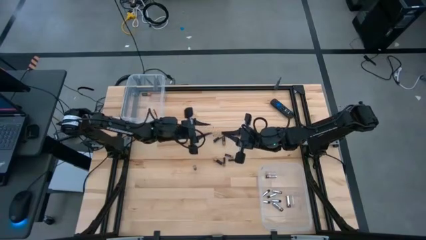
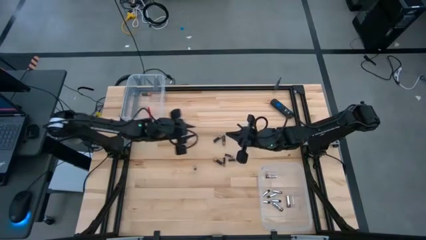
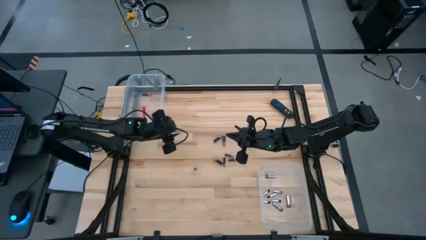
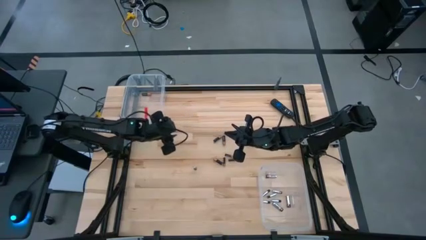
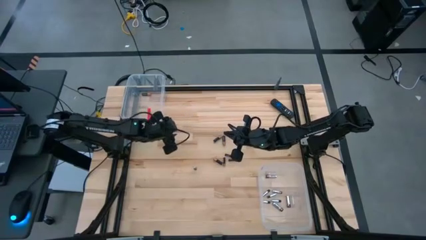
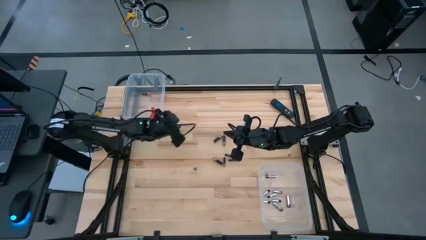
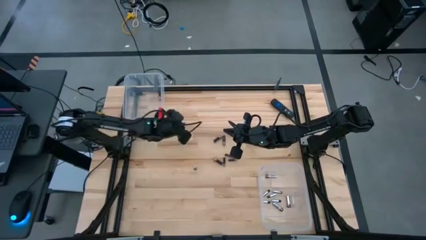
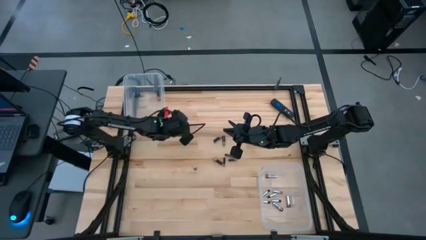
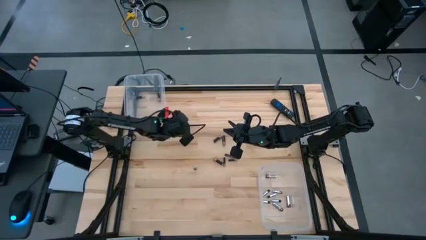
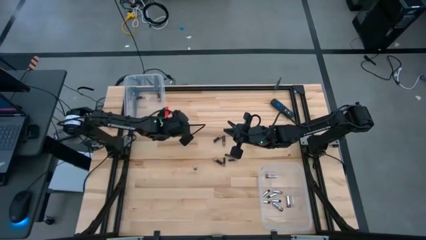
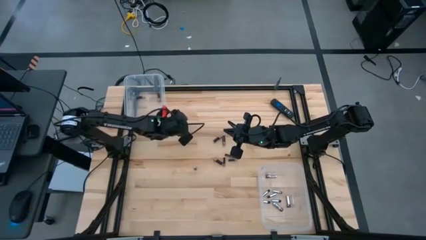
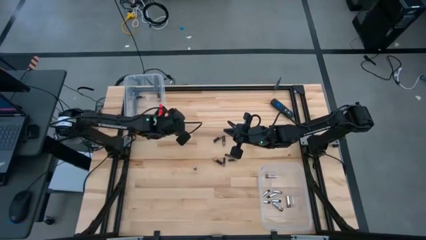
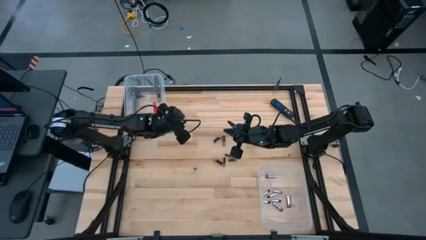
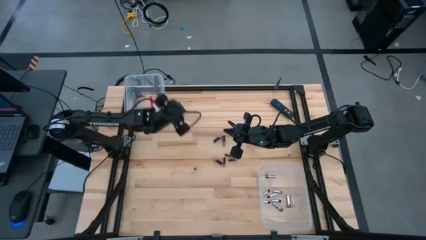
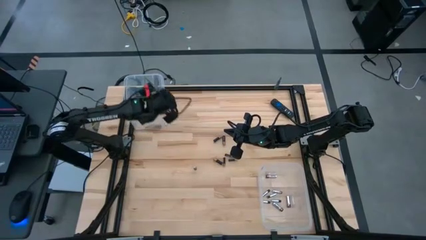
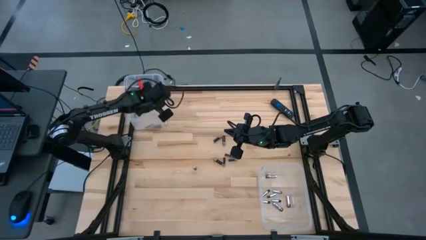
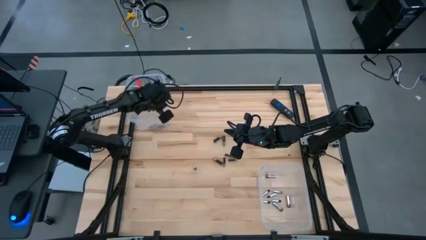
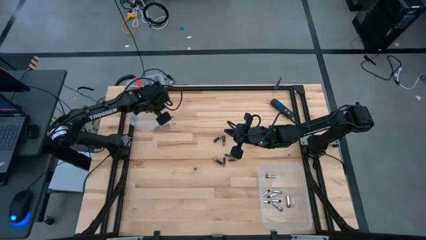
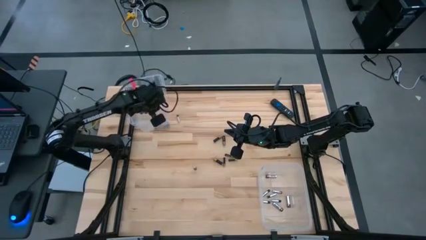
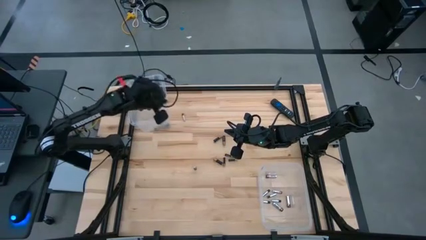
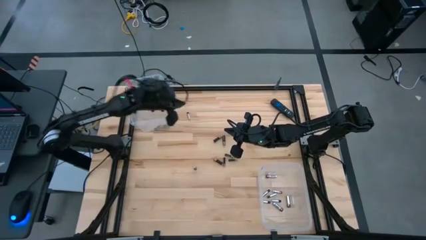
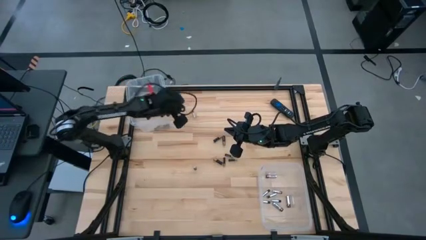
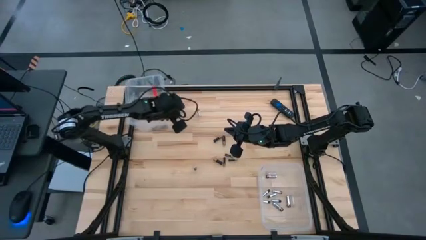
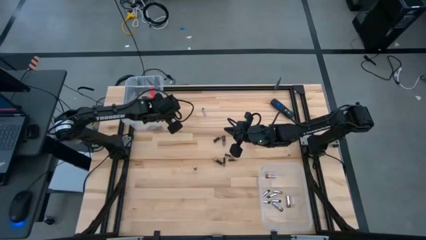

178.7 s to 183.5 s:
Task: Sort batteries
Adjust the top transparent bin

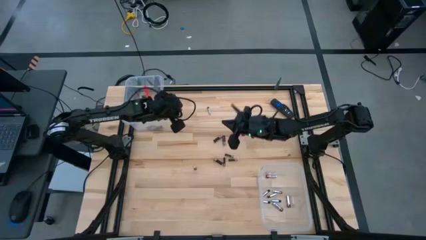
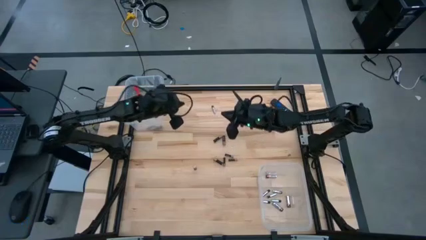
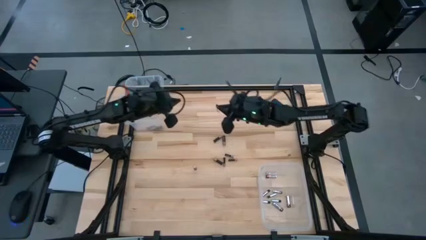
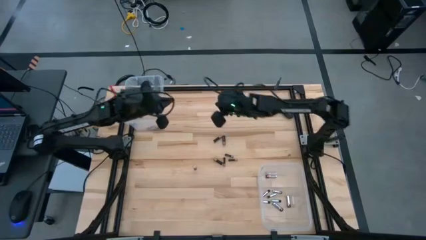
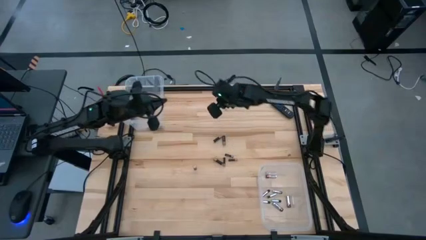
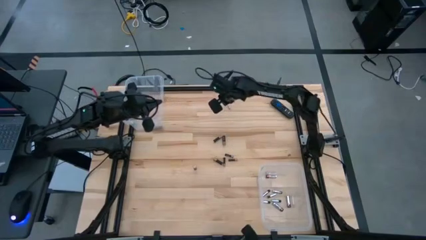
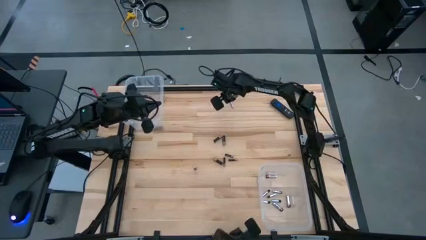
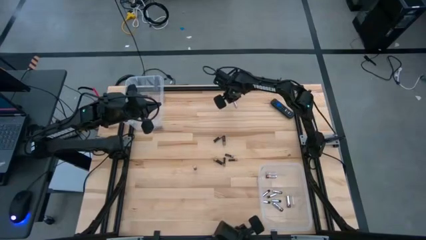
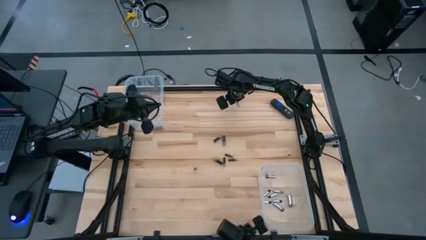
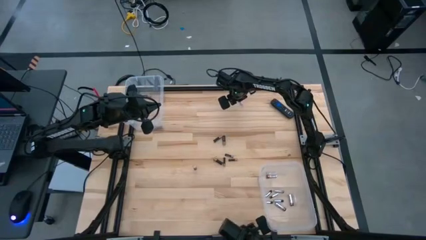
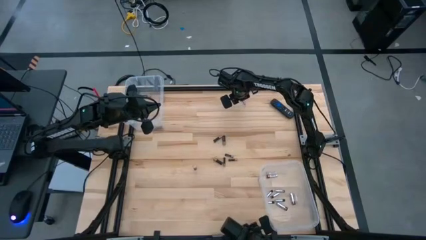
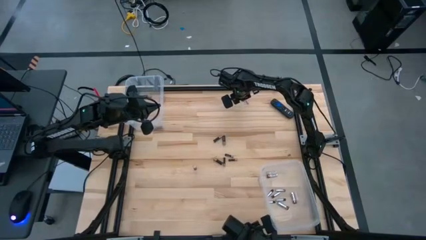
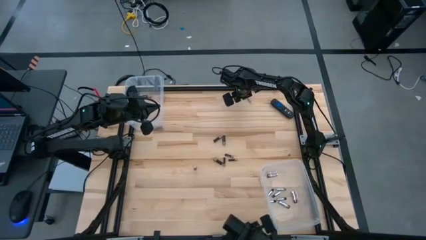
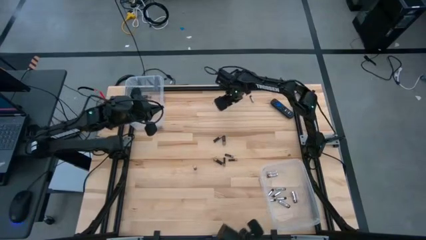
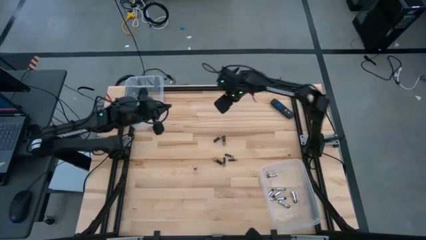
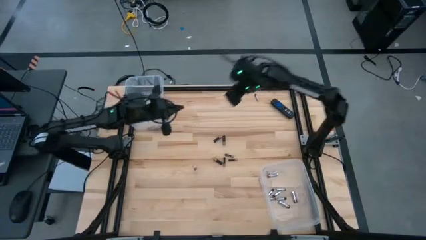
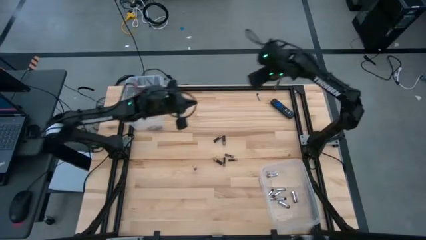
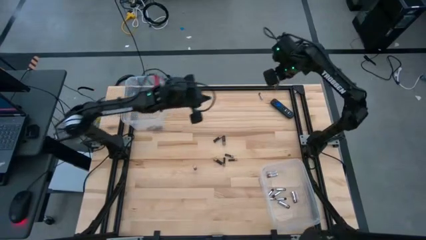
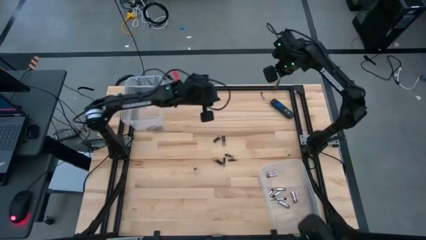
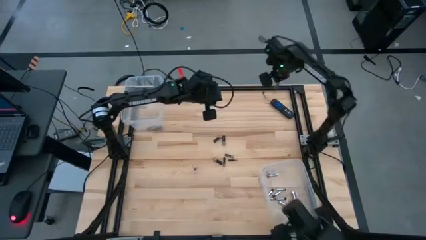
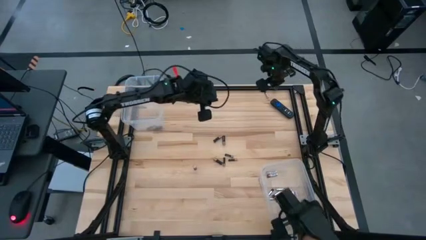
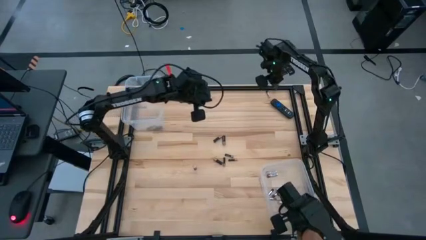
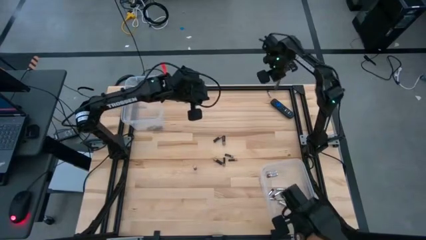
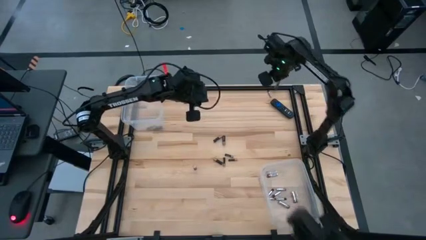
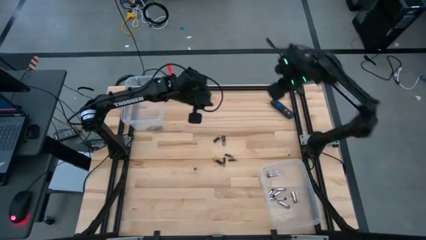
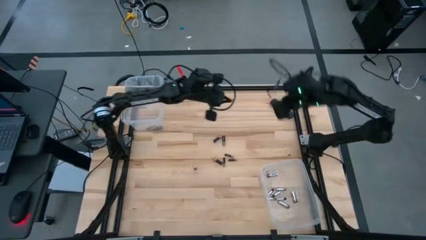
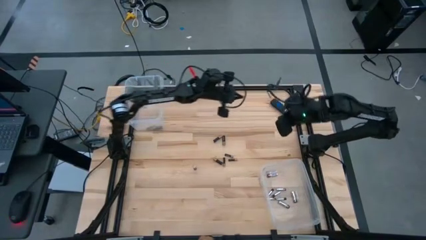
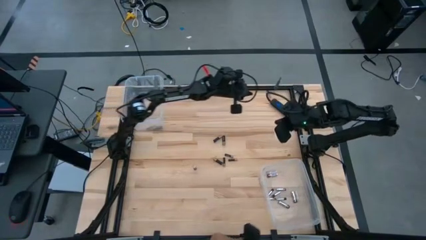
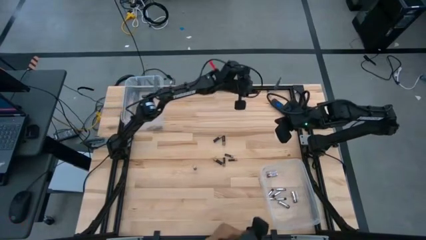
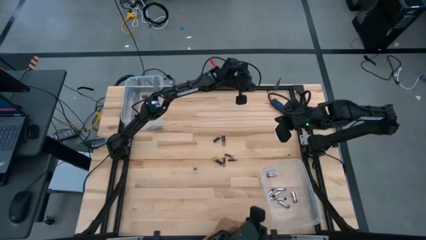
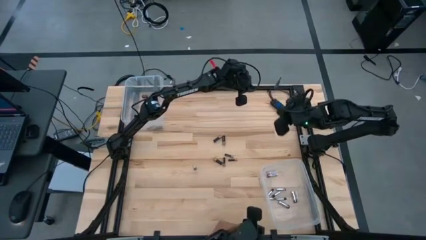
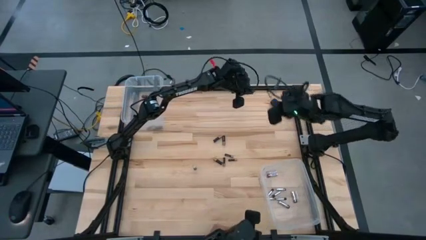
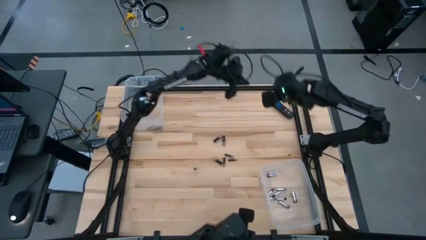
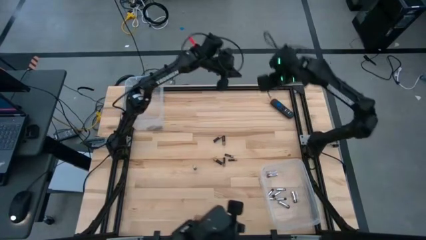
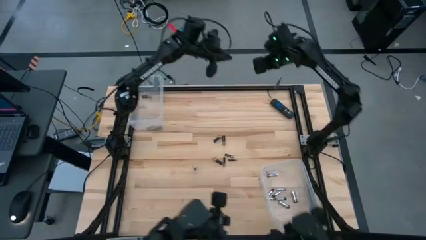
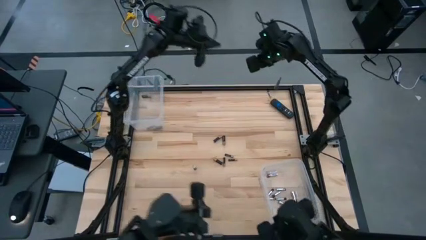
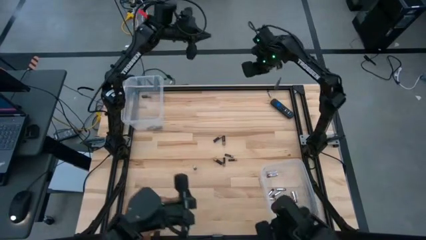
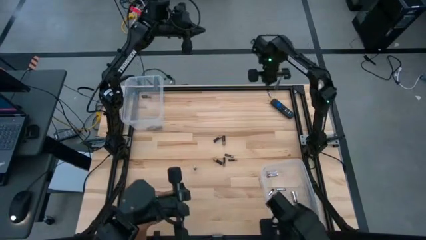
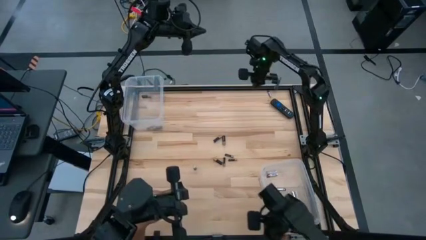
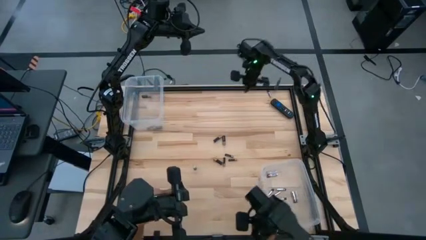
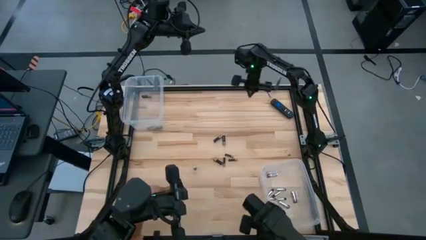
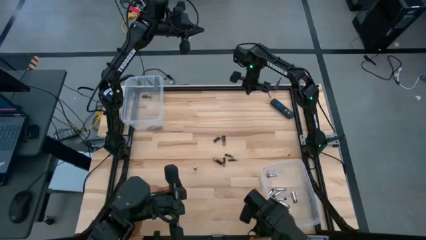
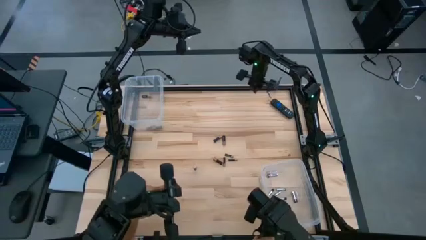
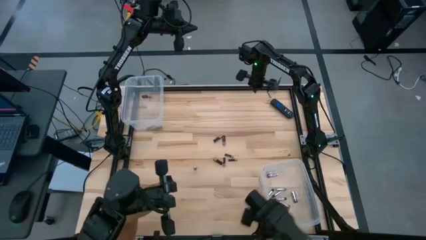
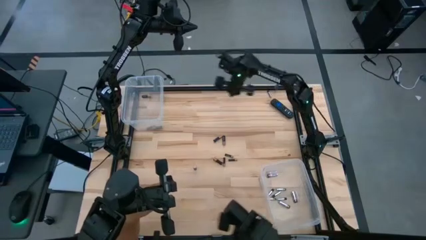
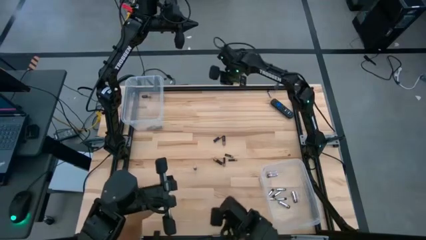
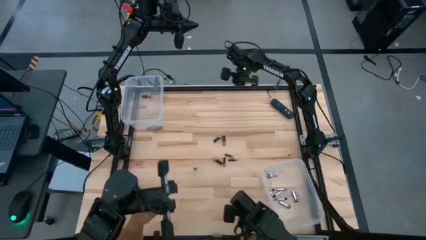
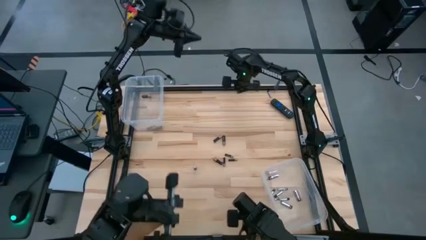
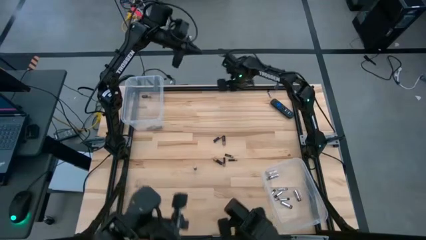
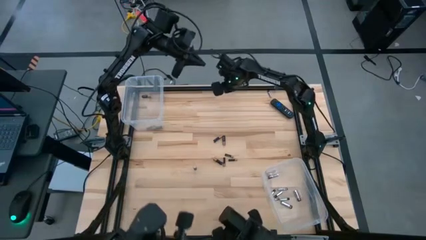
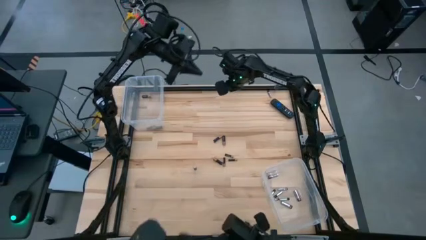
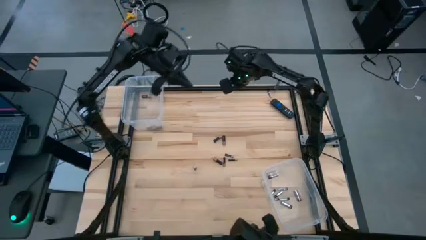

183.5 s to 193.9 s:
Put the black and silver battery into the bottom transparent bin
